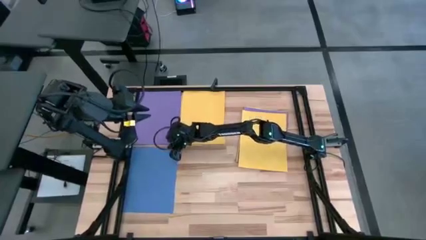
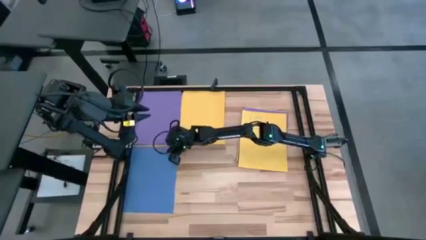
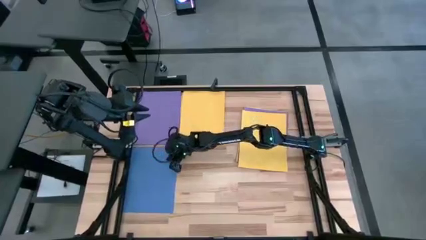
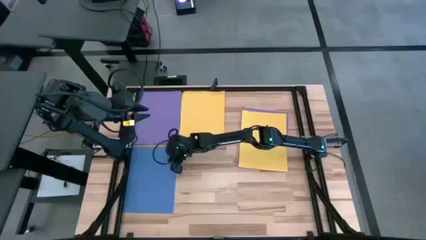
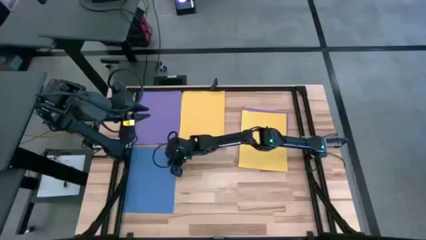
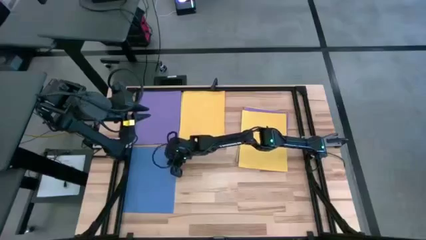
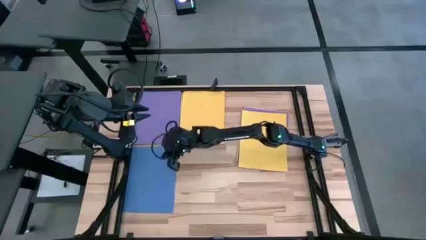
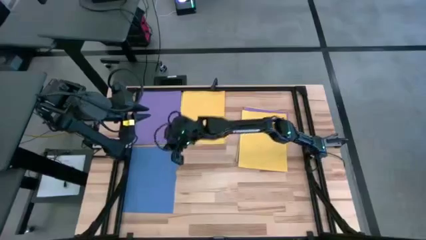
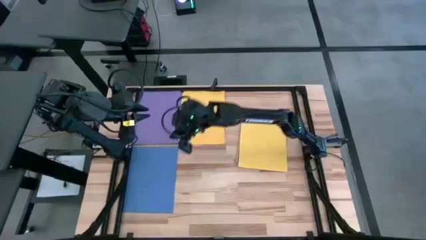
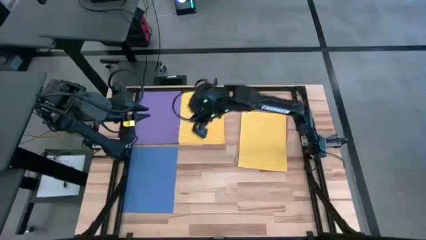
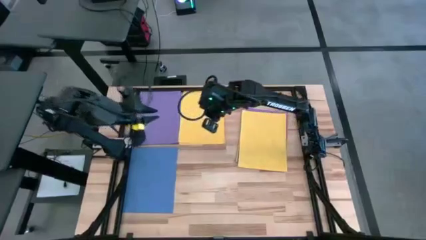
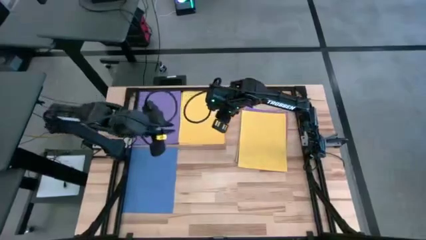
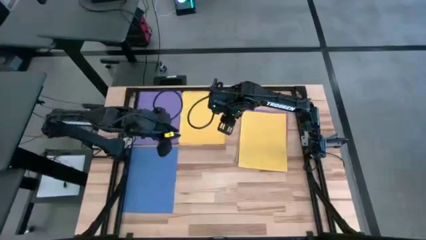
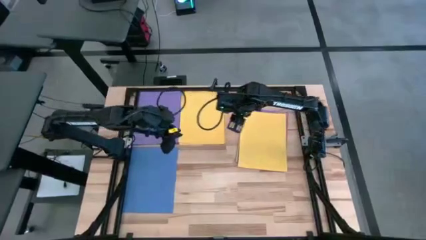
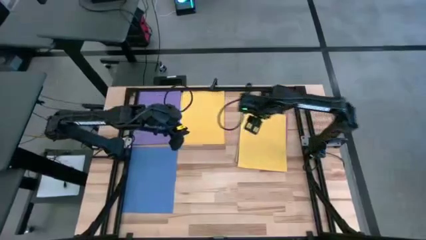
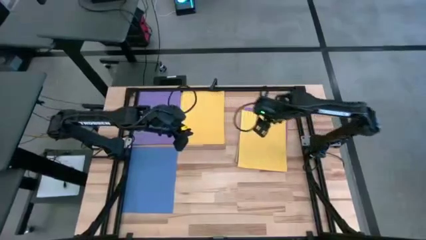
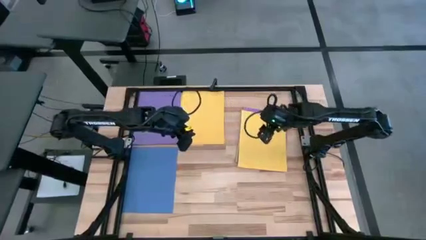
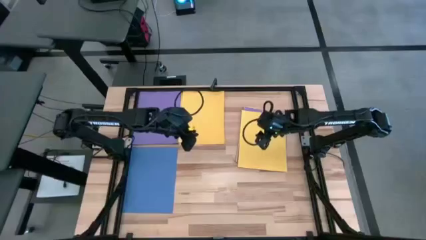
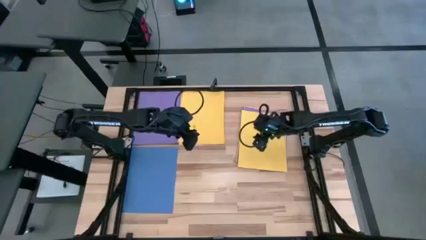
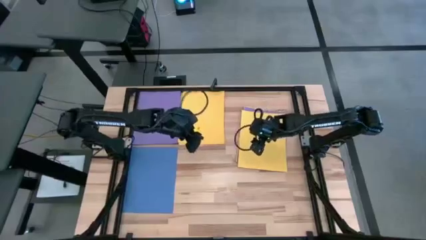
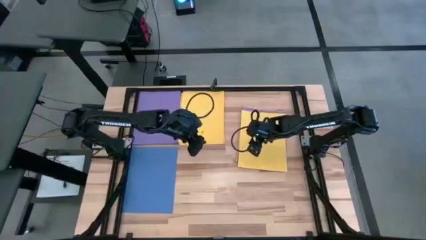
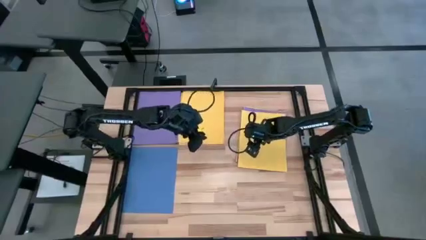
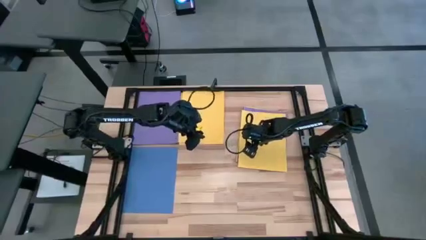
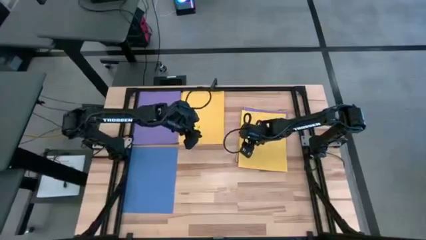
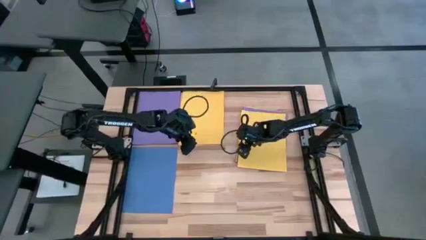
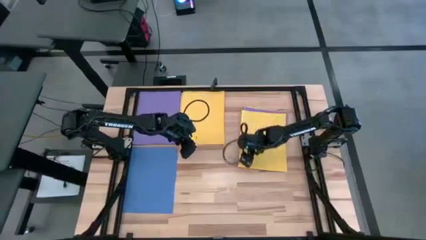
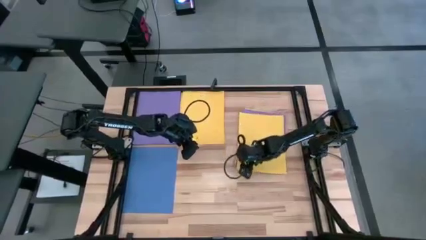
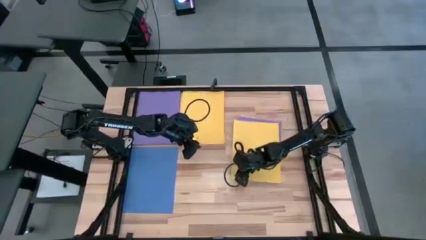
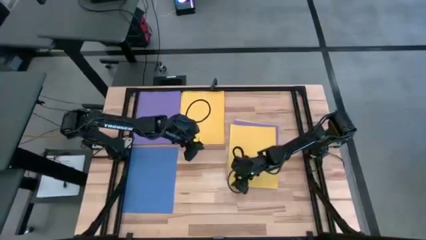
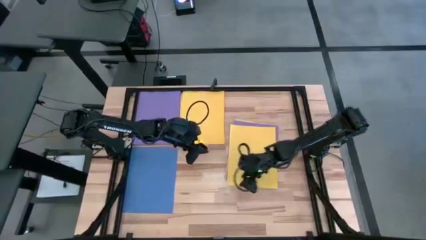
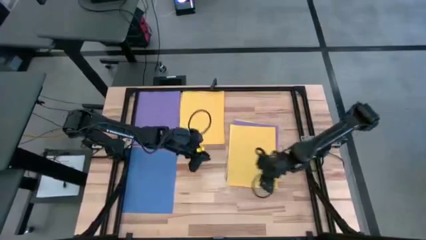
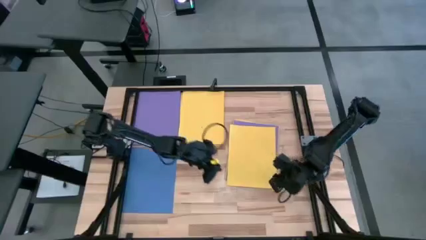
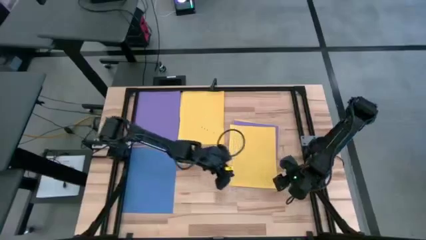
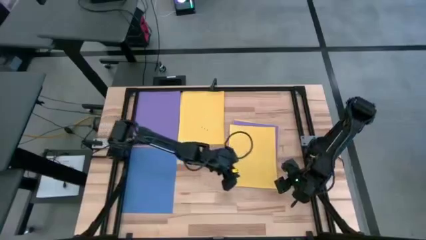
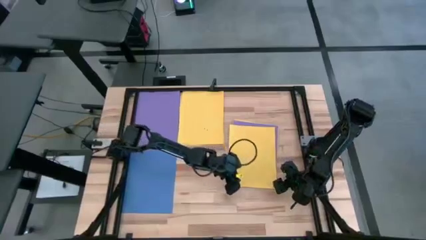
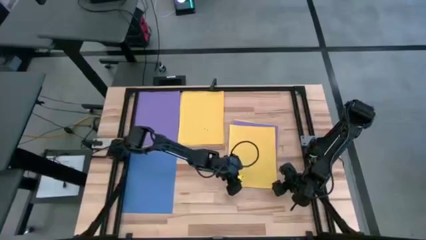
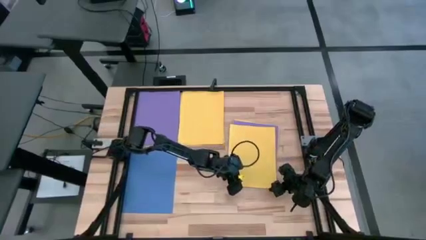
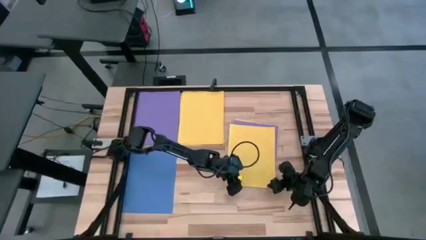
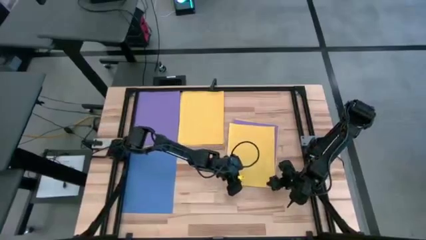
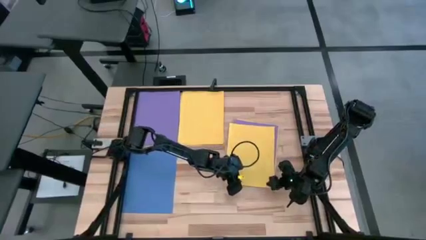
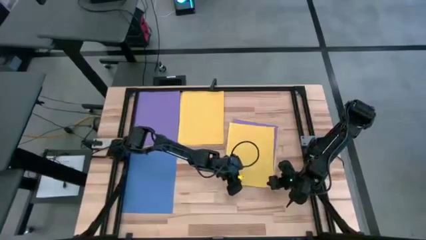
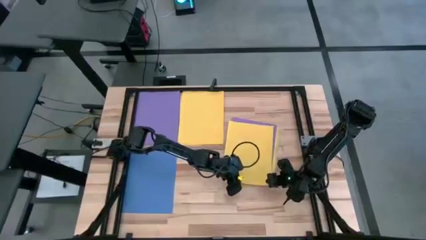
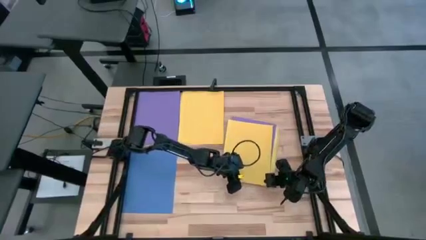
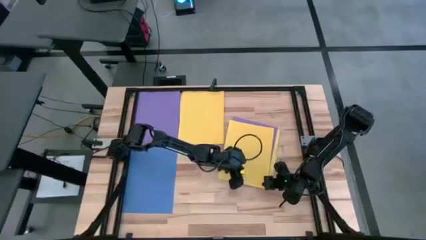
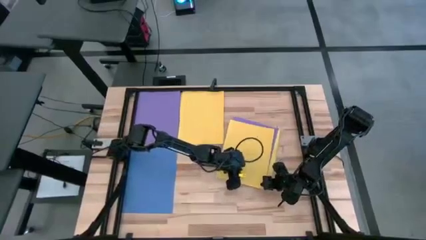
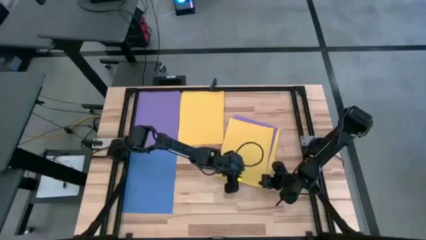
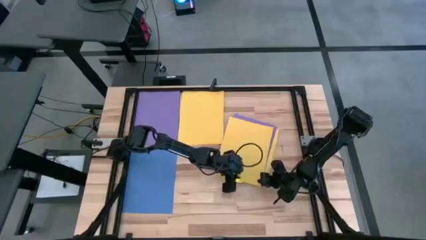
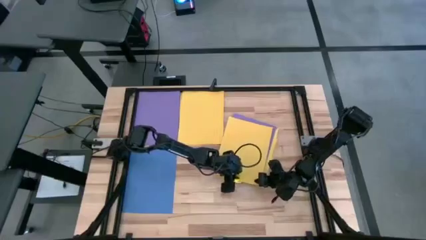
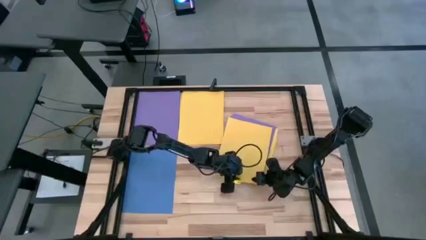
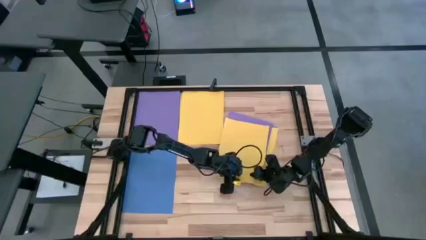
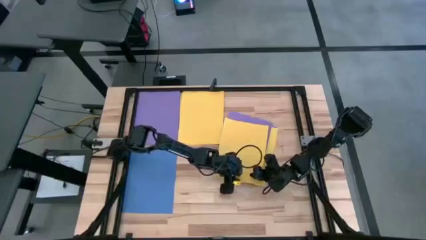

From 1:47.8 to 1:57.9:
Task: Organize paper
Stack the yellow paper on top of the yellow paper

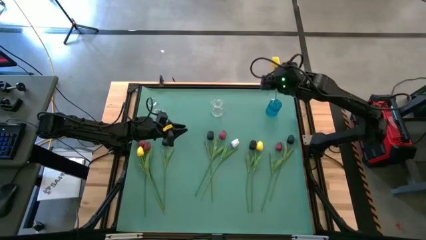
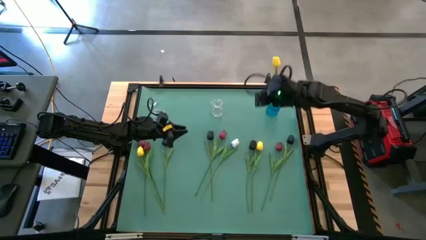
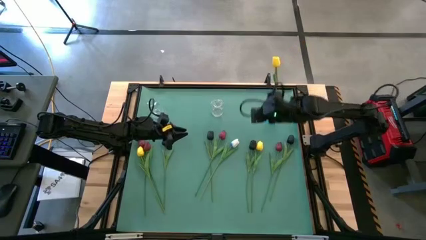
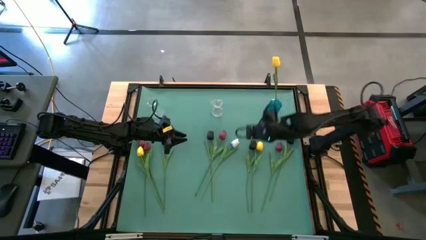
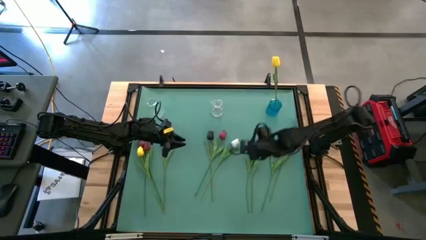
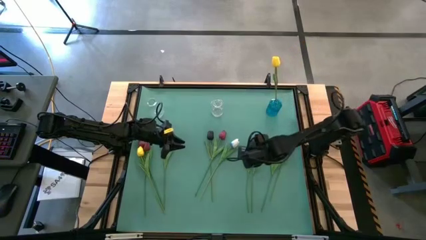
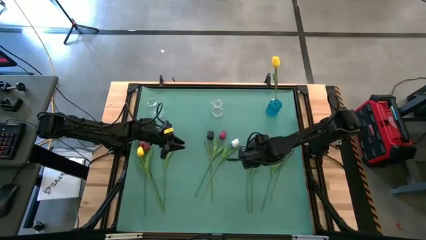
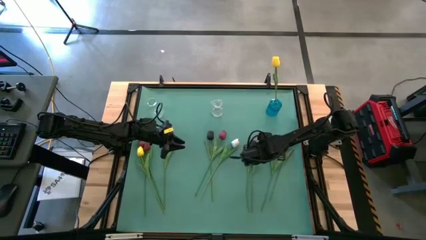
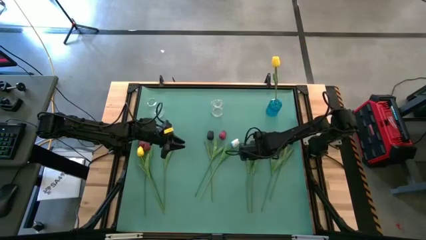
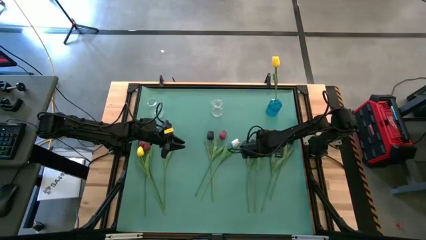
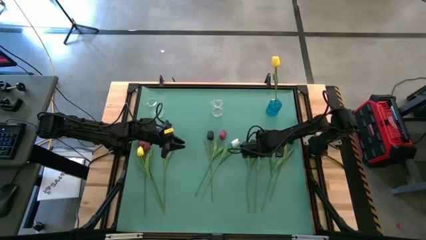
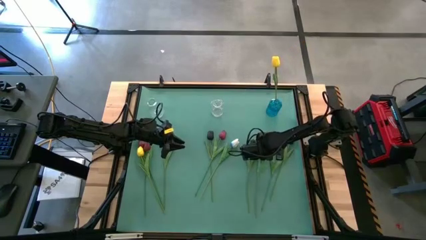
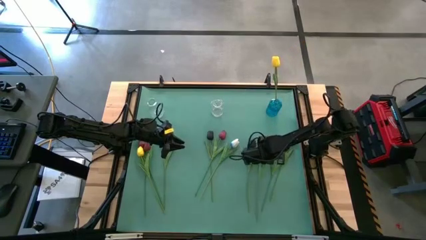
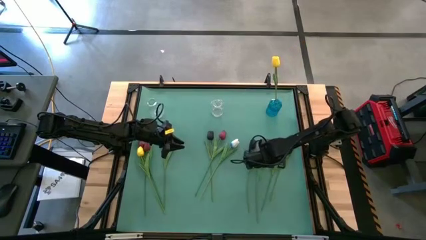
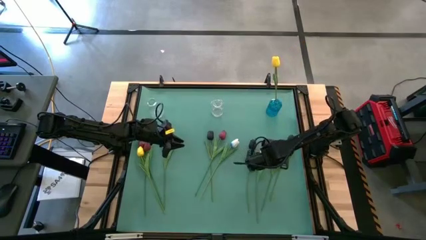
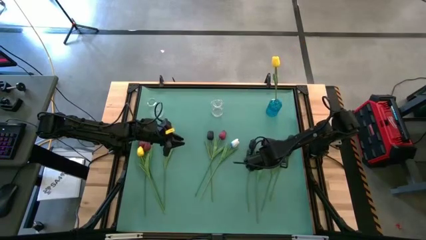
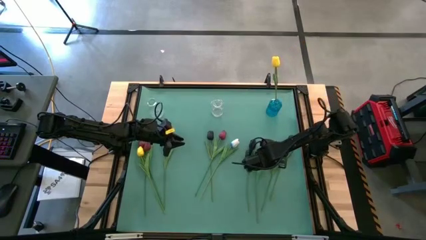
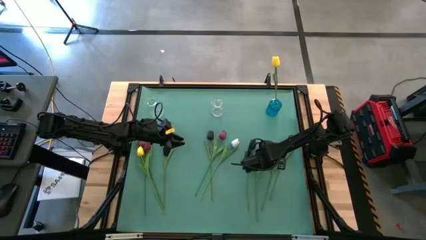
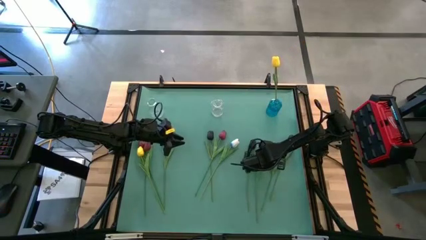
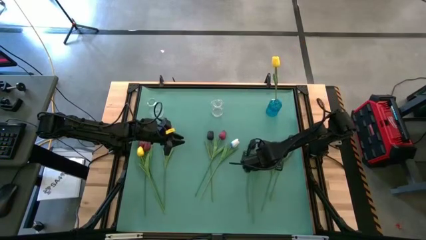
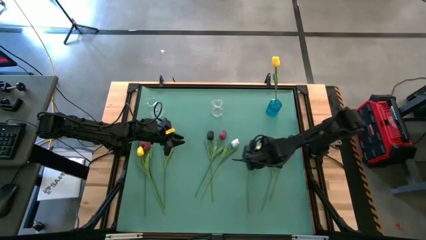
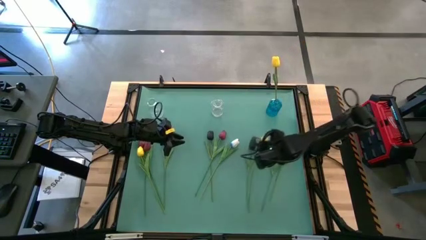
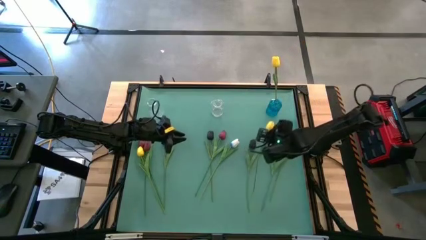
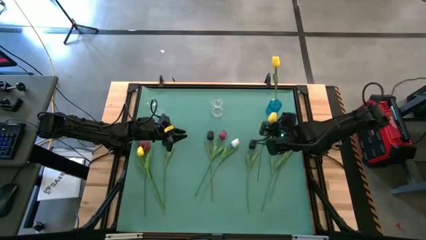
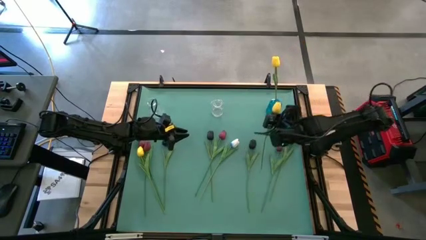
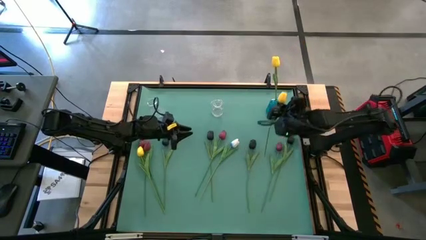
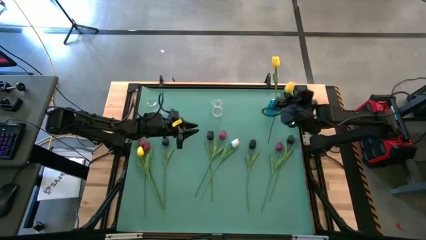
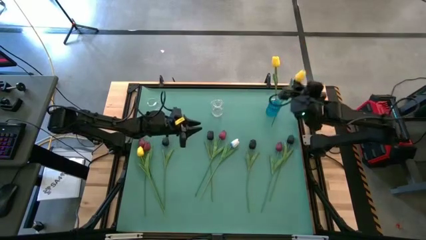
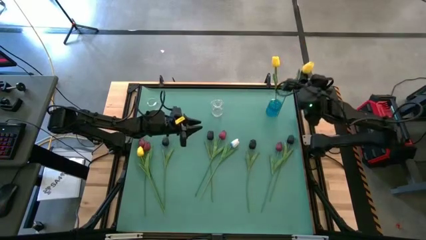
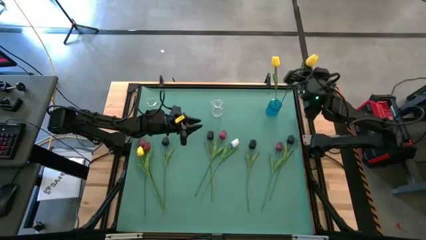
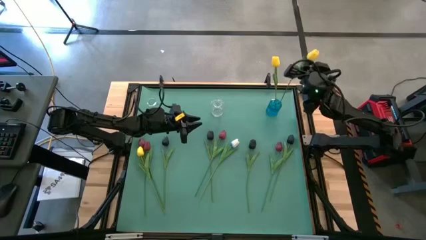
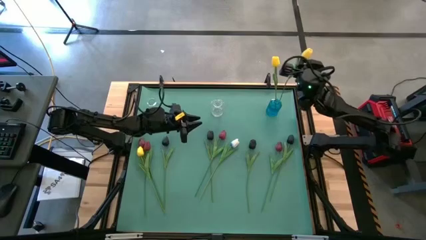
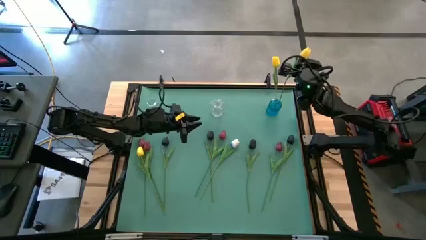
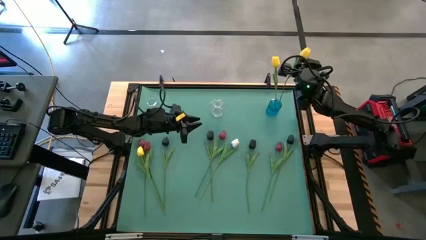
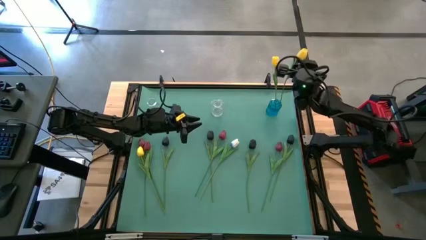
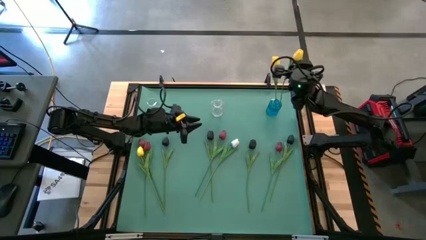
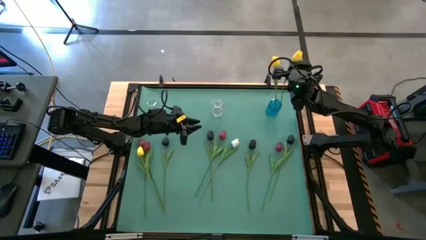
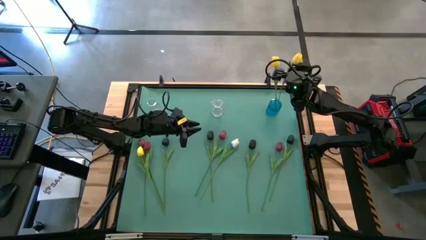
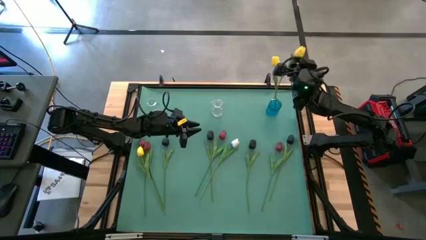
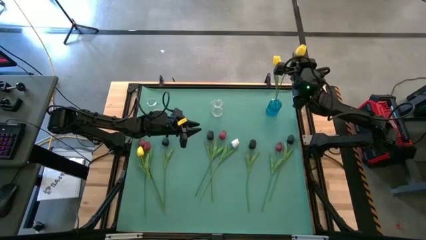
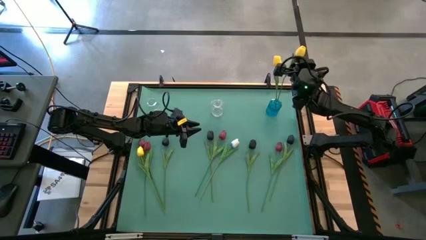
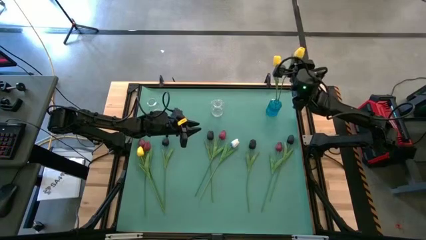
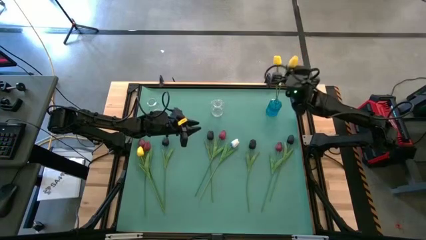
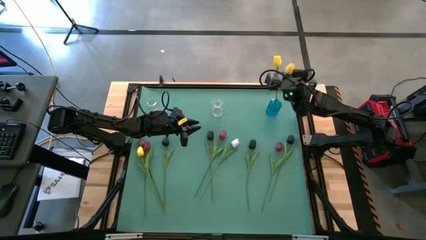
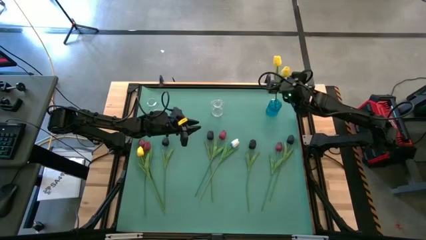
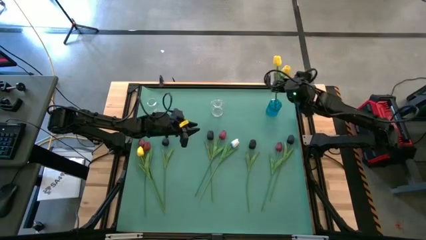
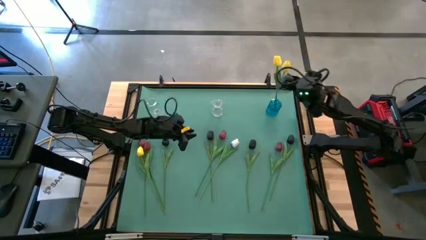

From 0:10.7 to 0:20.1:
Task: Sort flowers into vase by color
Put the yellow tulip into the blue vase
